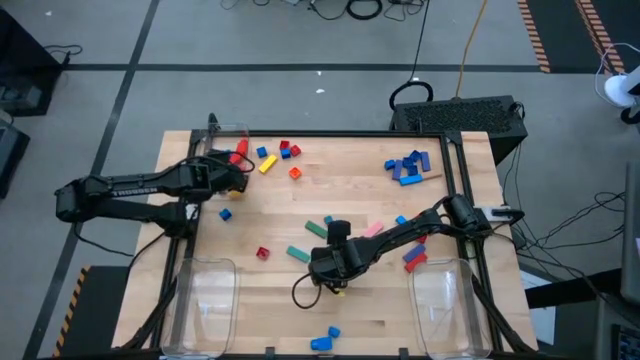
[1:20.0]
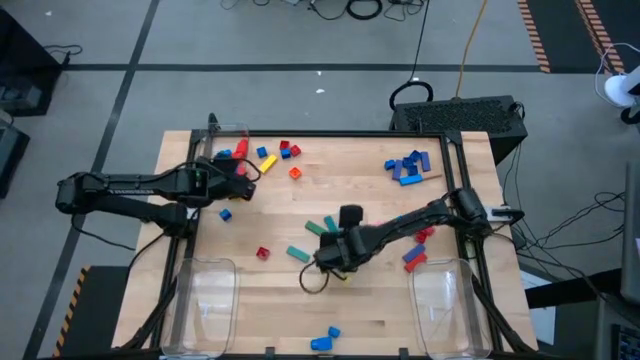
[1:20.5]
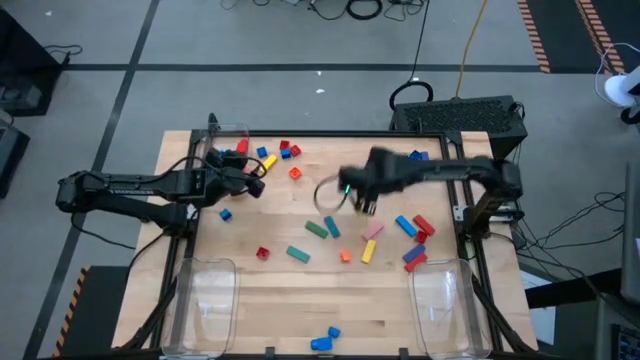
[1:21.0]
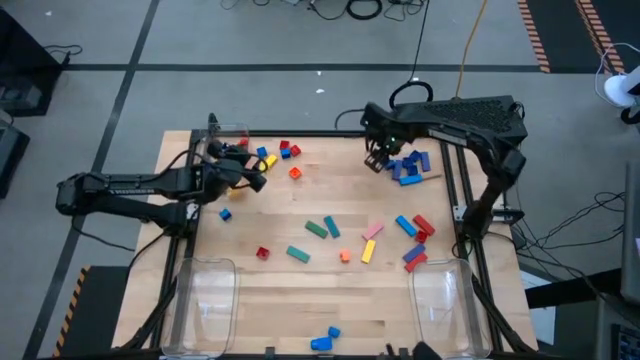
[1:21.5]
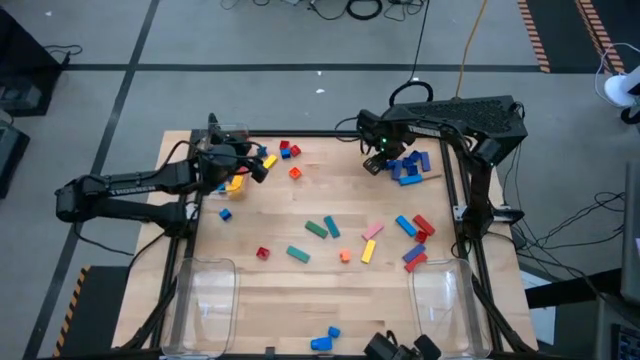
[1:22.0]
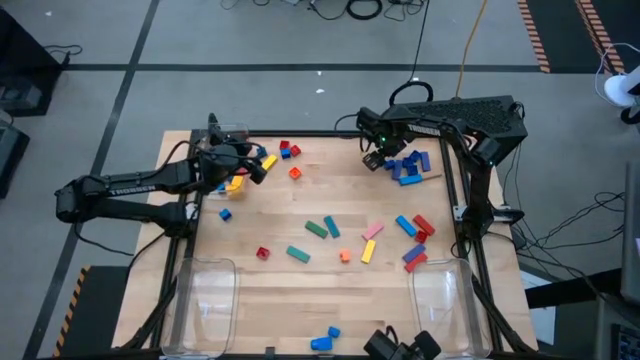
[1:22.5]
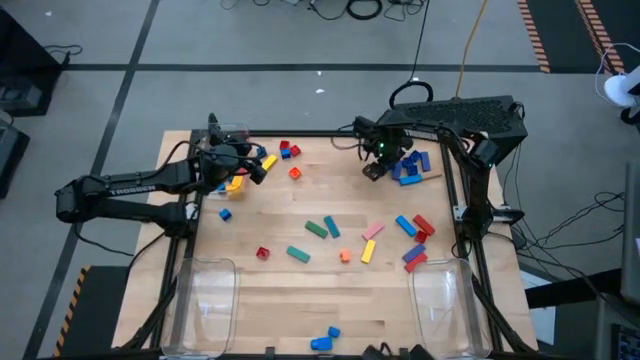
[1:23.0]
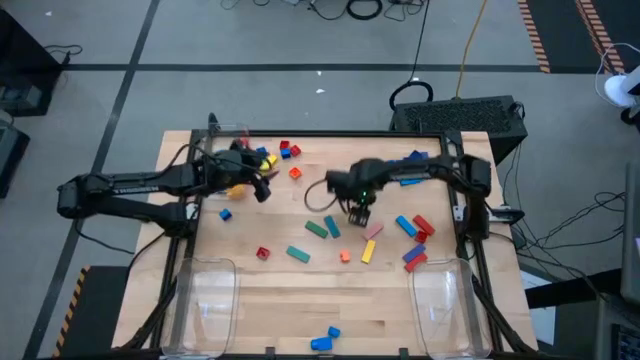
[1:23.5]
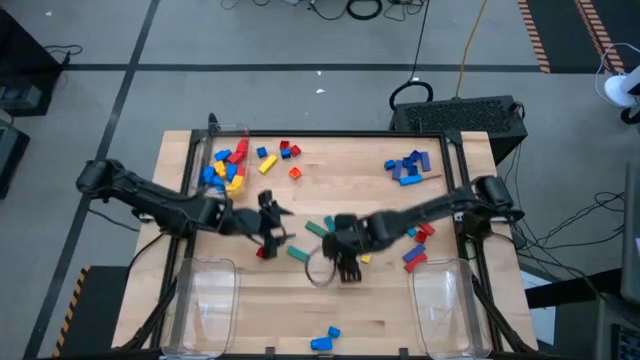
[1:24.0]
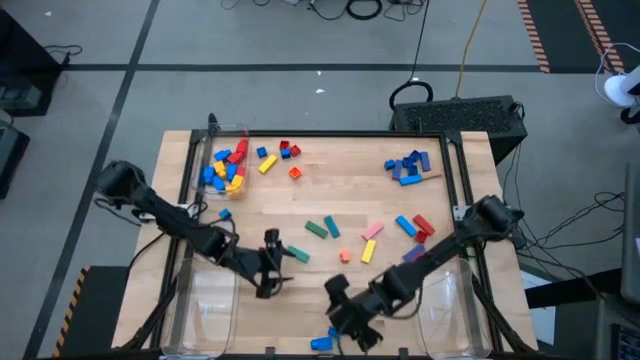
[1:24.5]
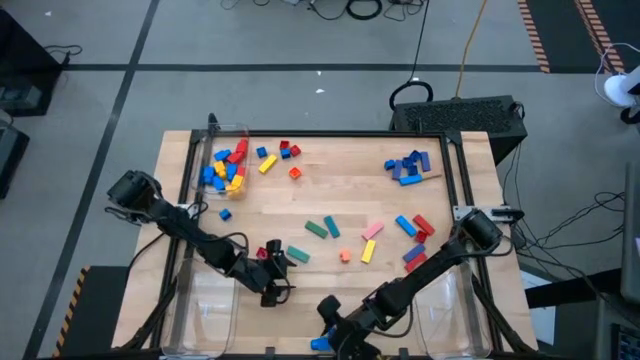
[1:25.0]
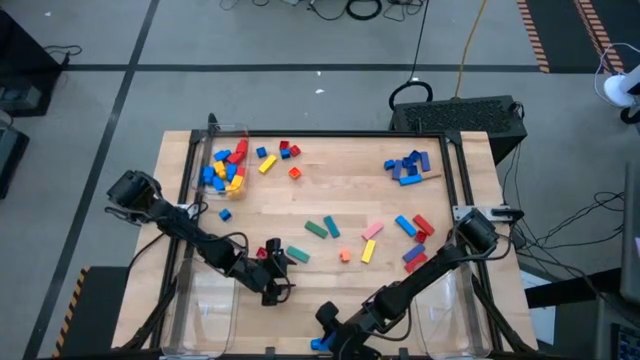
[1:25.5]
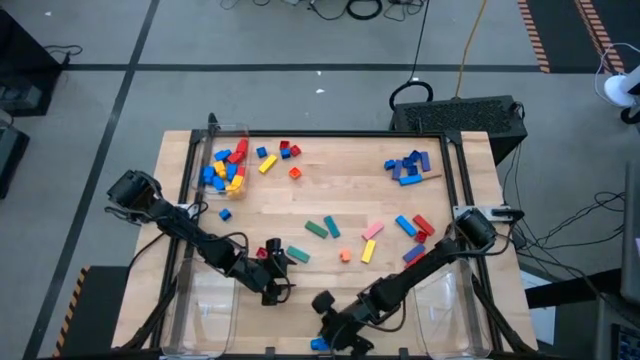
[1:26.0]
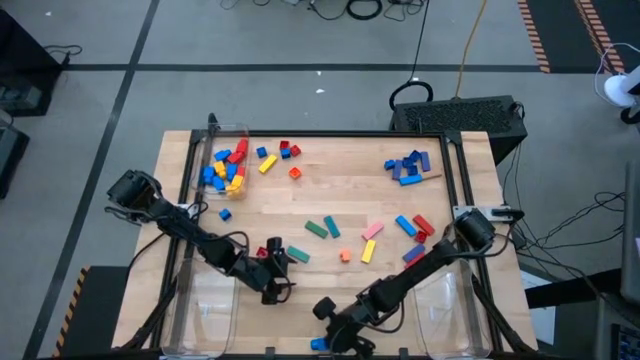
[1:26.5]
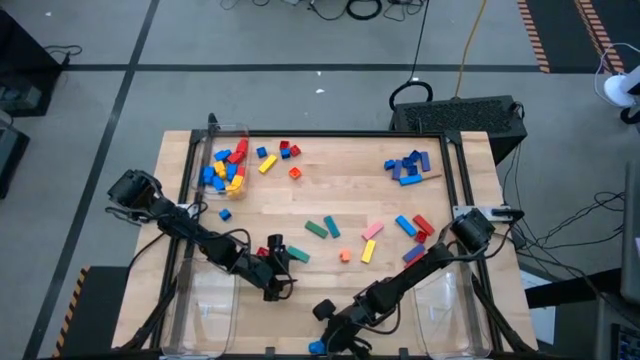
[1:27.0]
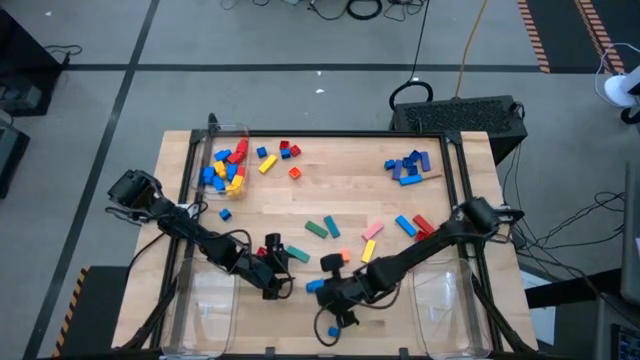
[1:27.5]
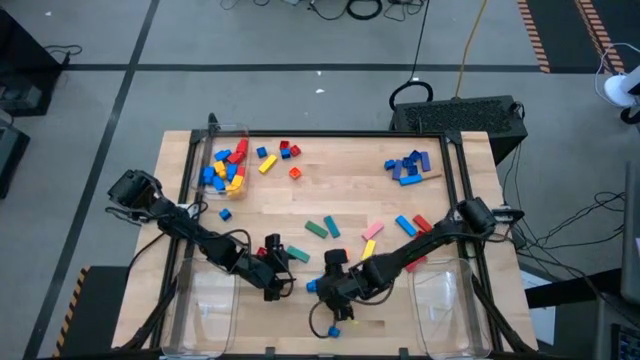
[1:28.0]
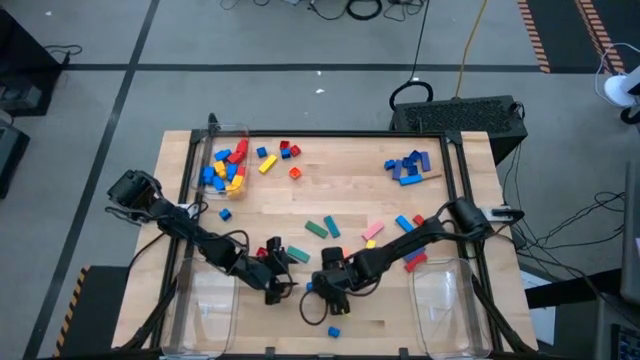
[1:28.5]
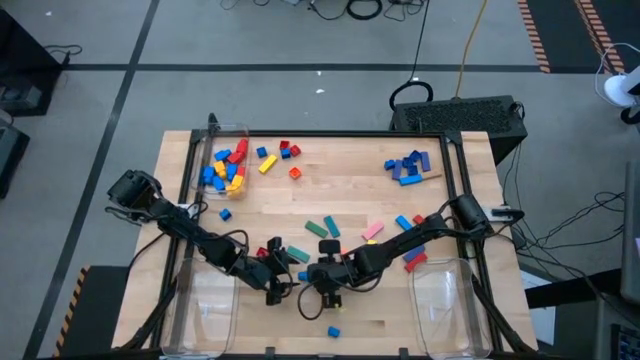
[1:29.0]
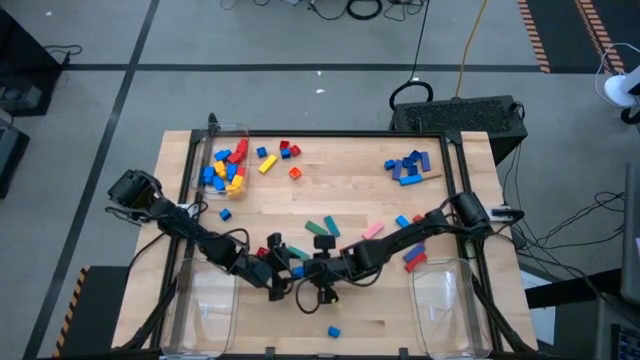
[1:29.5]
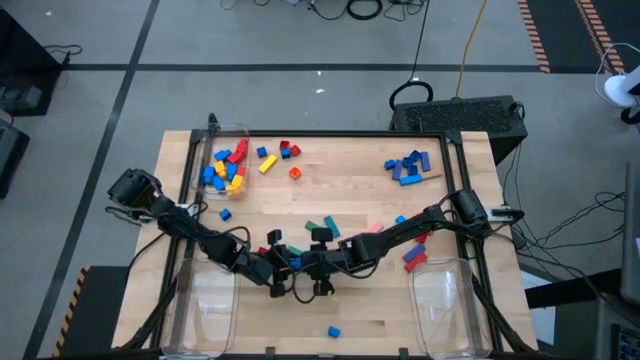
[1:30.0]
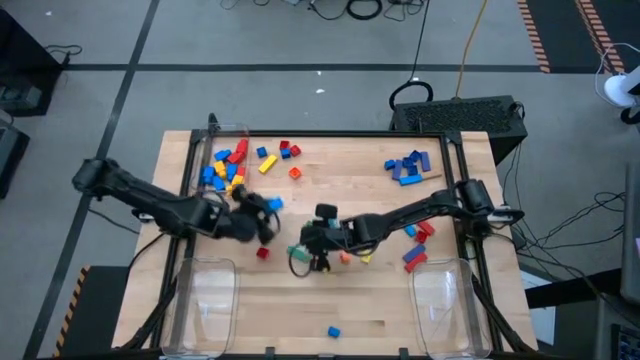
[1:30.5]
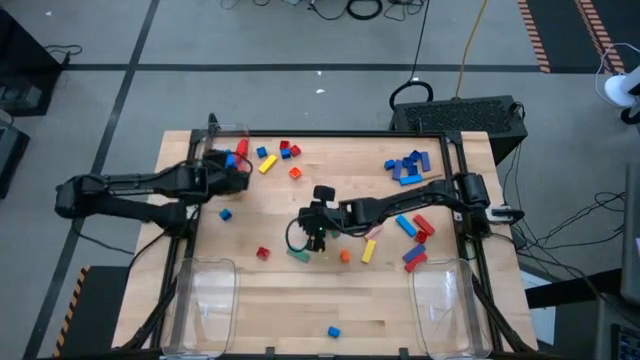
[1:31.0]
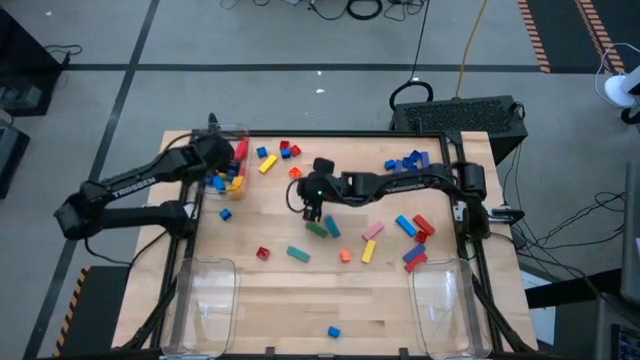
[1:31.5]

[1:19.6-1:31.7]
Task: Sort blocks by size
Put the blue one stud game piece into the top left transparent bin

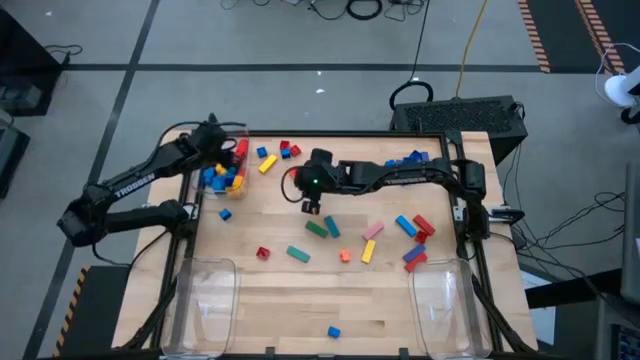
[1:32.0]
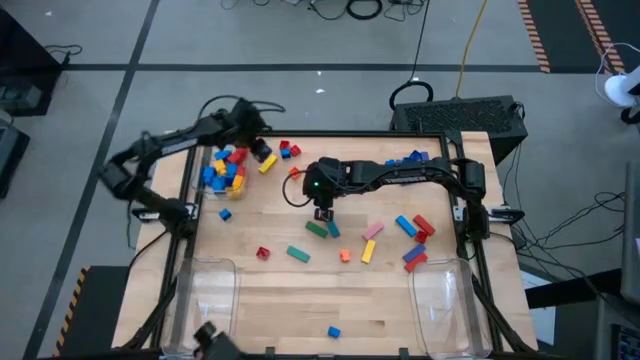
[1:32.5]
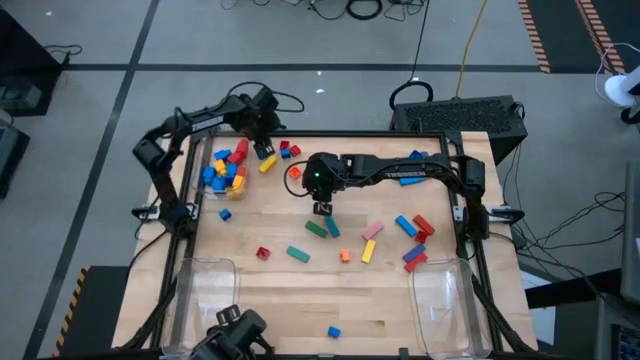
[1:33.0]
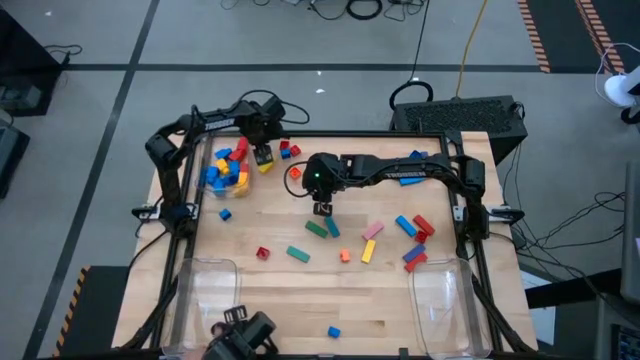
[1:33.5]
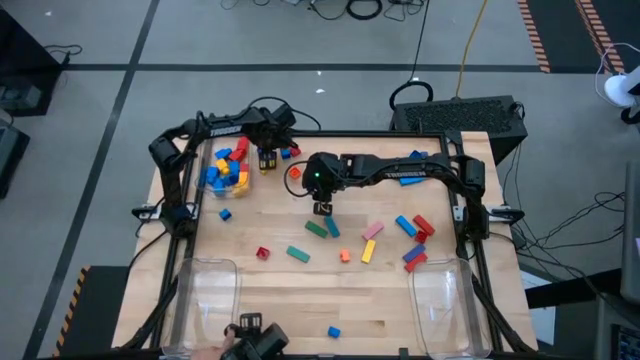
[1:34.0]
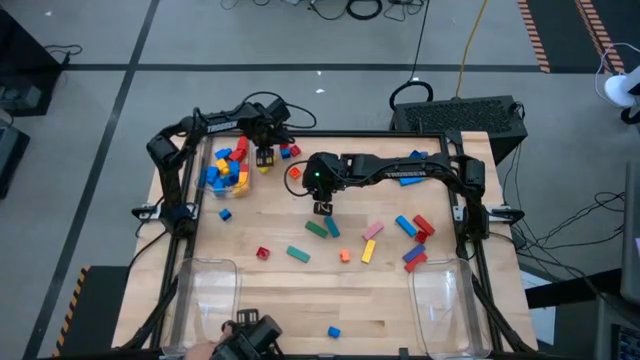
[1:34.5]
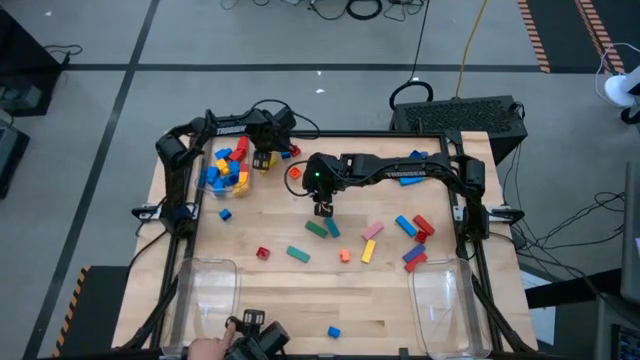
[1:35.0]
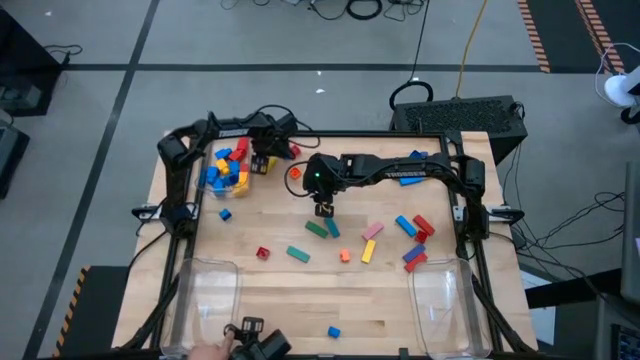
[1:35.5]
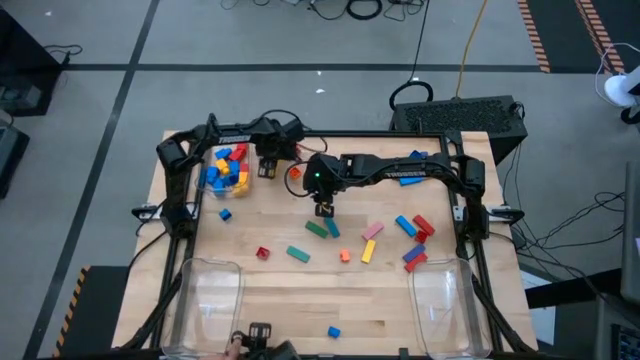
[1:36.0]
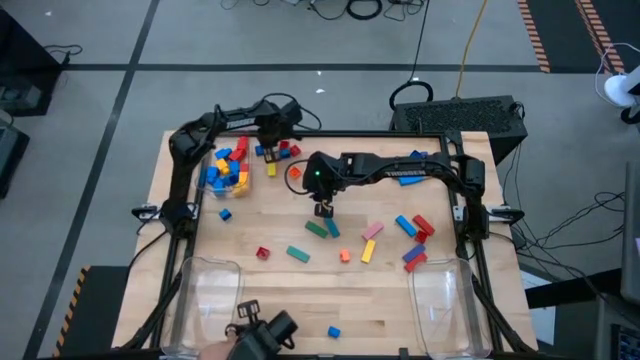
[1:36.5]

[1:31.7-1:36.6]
Put the blue four stud game piece into the bottom left transparent bin

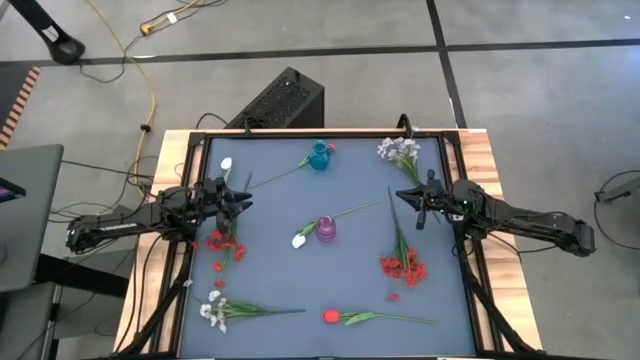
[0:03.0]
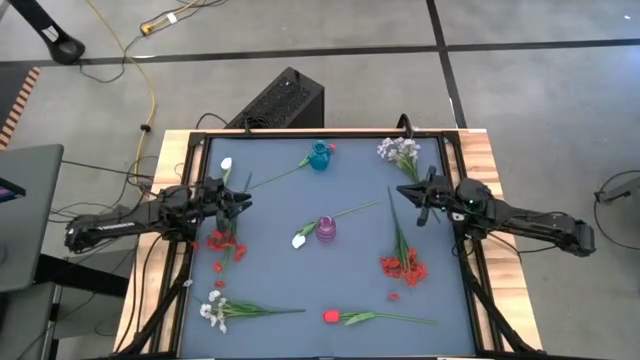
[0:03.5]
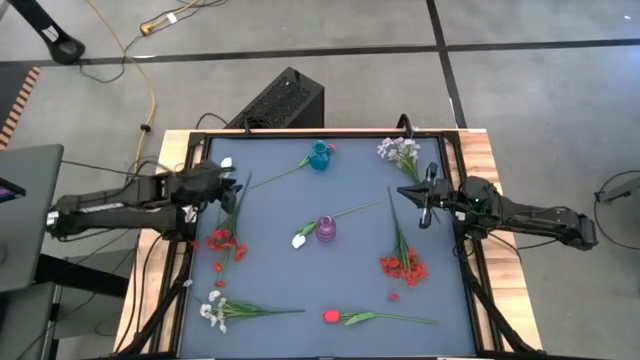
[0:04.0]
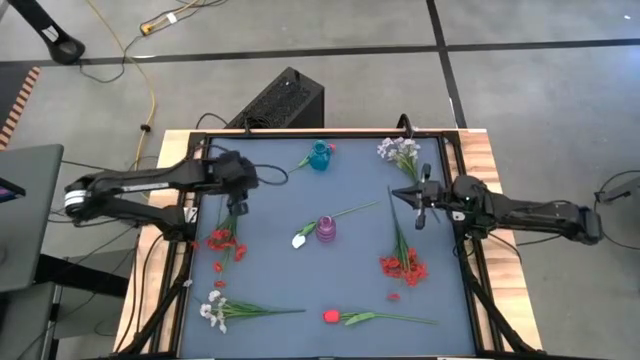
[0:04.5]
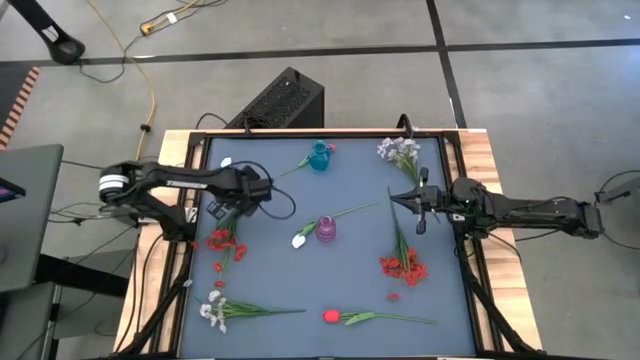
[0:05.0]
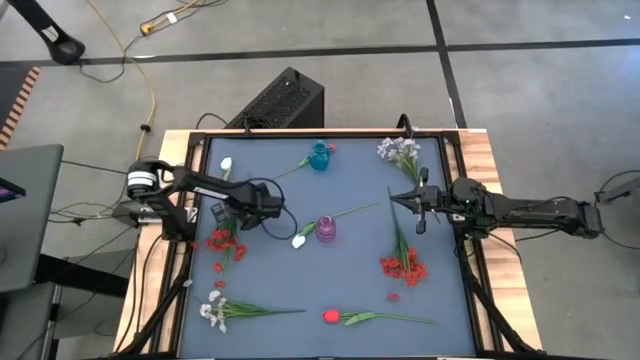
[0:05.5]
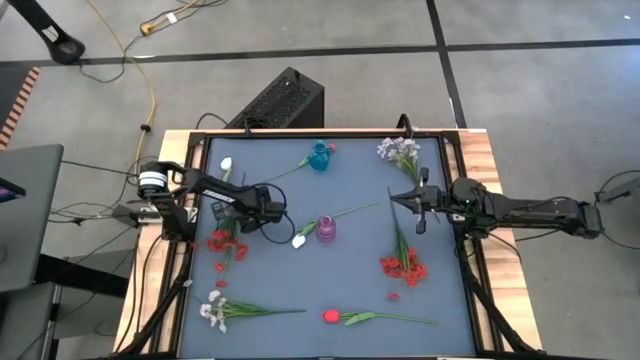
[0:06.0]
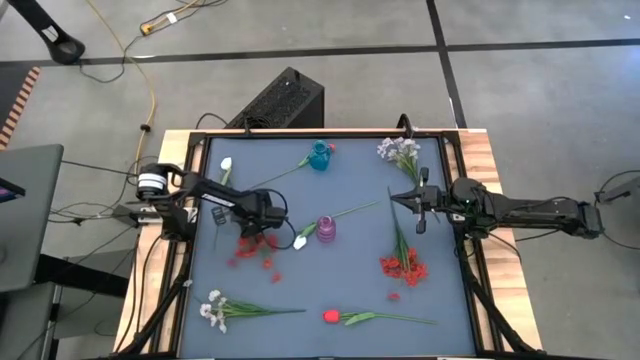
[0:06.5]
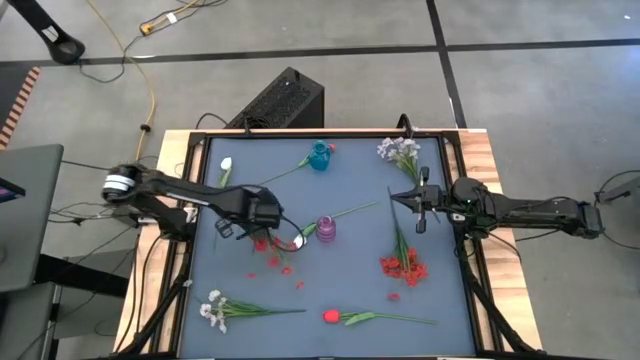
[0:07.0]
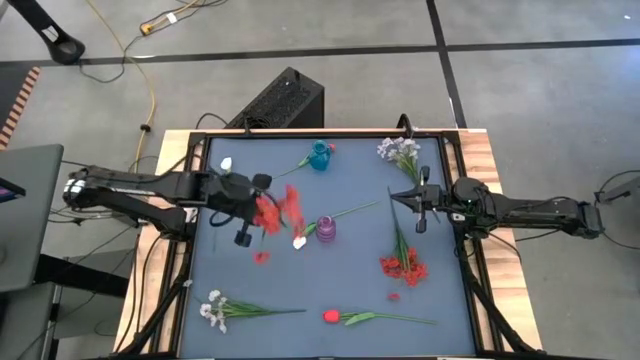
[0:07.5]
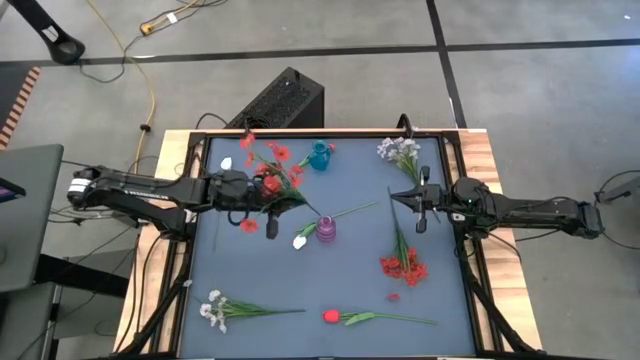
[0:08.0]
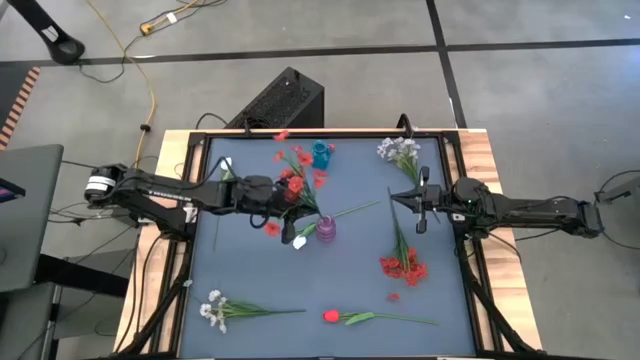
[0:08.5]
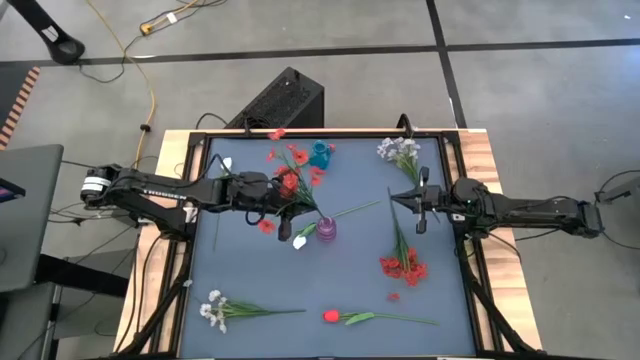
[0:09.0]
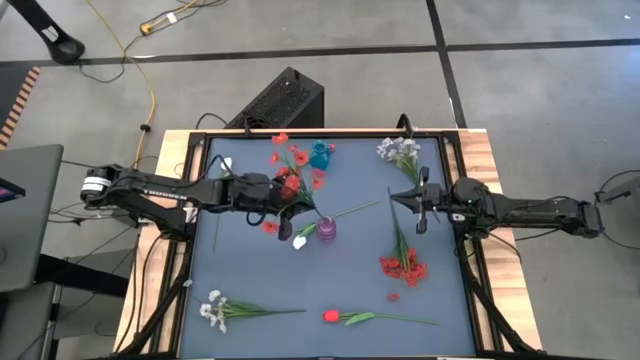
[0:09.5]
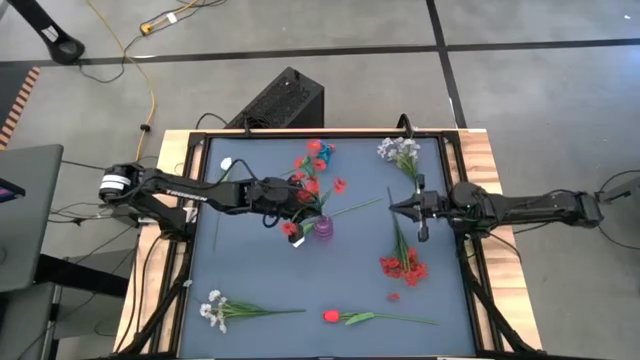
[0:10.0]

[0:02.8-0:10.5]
Task: Sort flowers into vase by color
Put the left orange flowers into the violet vase
